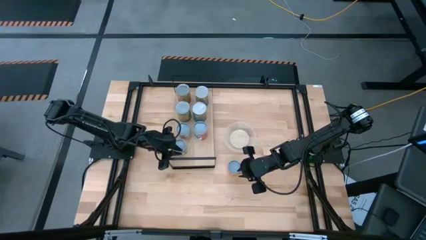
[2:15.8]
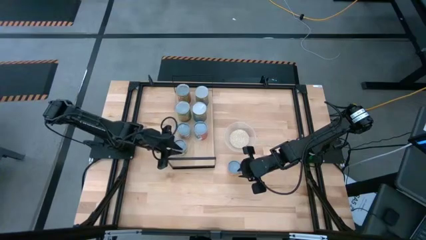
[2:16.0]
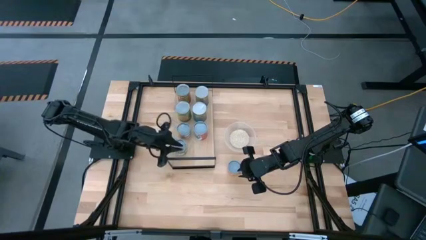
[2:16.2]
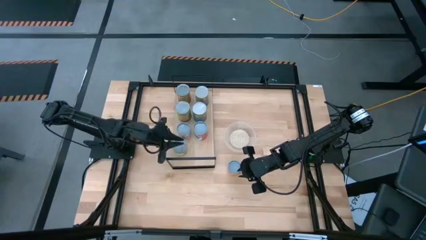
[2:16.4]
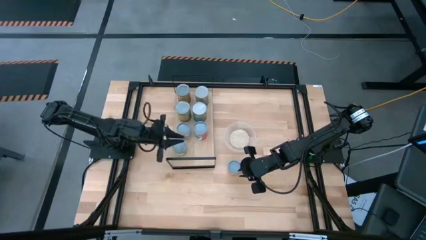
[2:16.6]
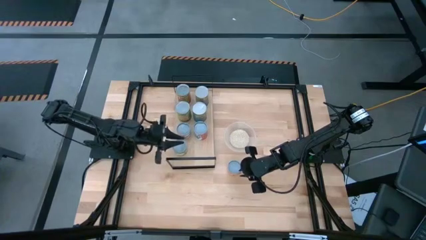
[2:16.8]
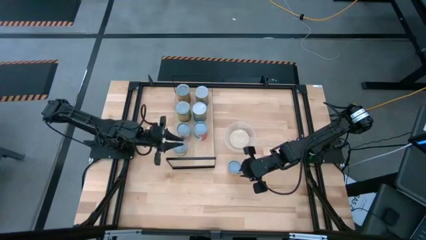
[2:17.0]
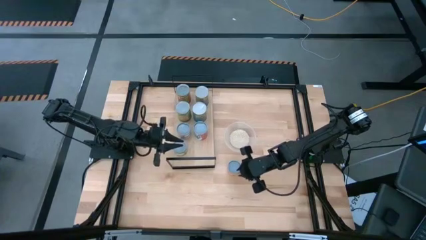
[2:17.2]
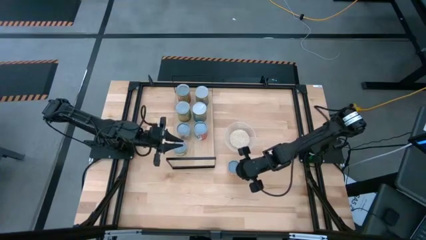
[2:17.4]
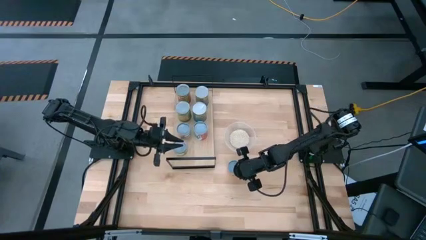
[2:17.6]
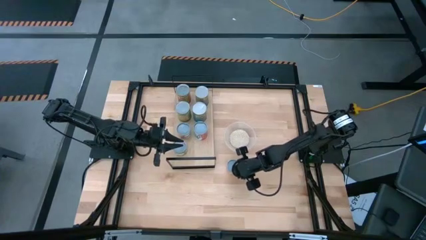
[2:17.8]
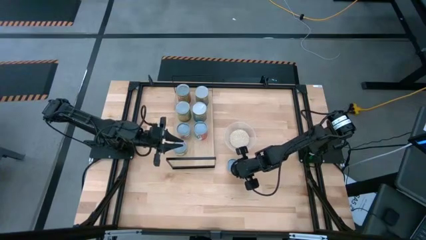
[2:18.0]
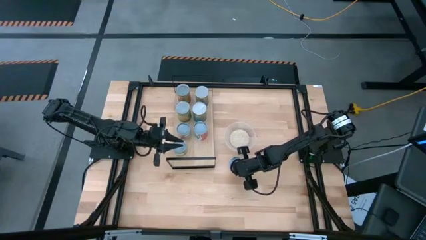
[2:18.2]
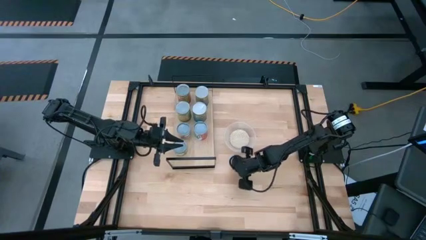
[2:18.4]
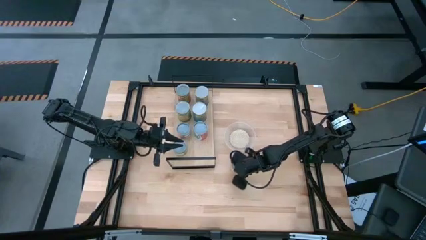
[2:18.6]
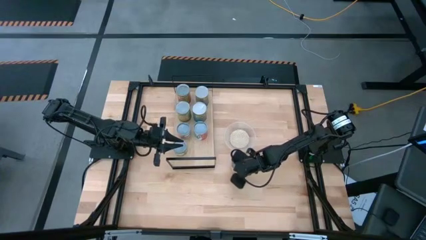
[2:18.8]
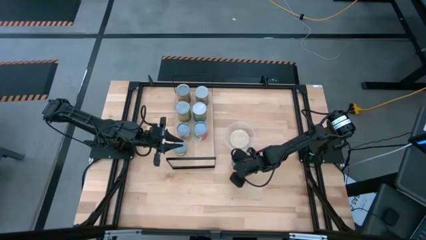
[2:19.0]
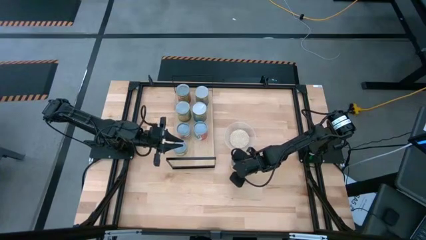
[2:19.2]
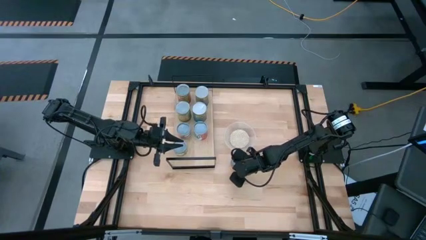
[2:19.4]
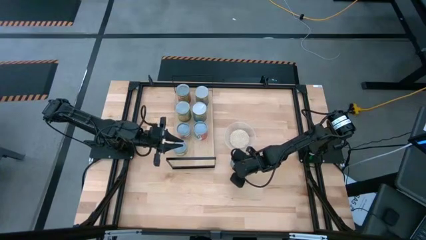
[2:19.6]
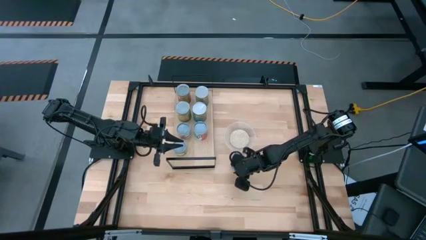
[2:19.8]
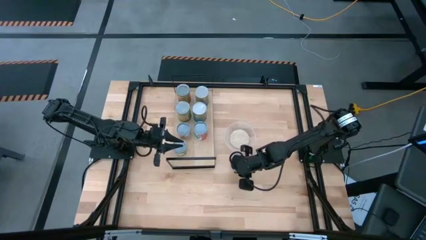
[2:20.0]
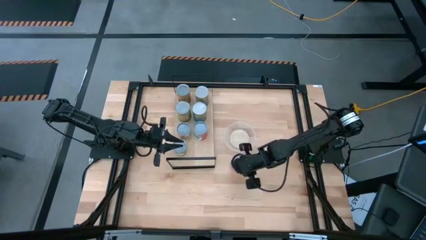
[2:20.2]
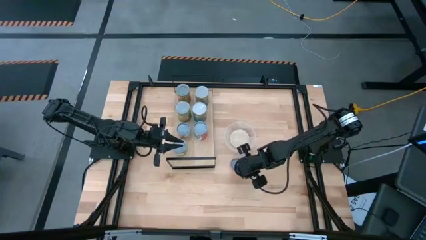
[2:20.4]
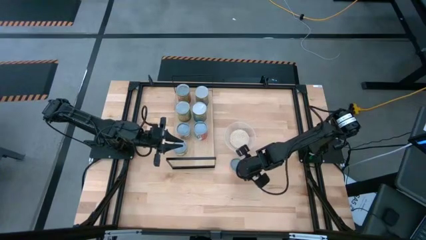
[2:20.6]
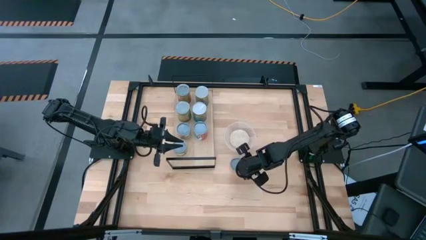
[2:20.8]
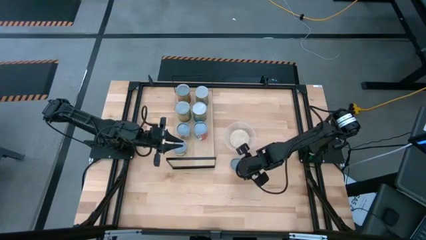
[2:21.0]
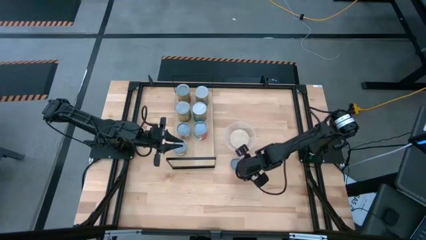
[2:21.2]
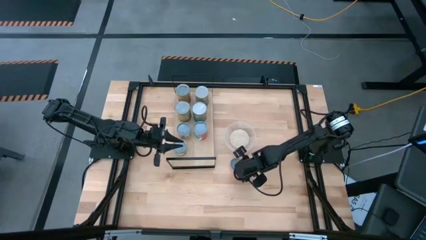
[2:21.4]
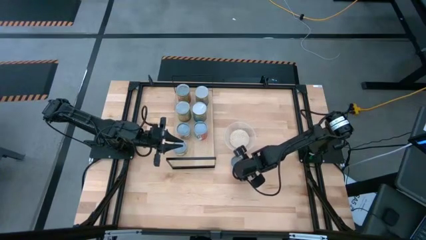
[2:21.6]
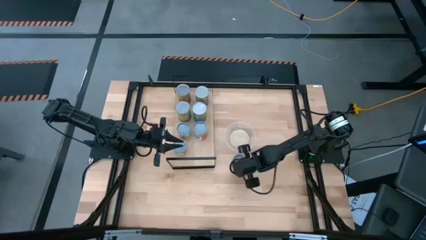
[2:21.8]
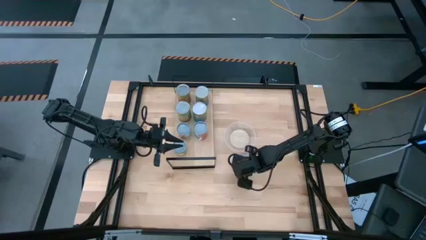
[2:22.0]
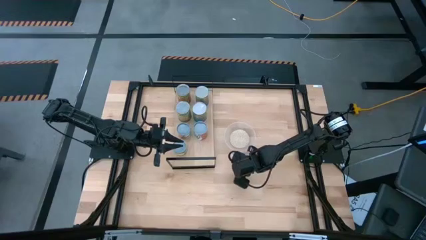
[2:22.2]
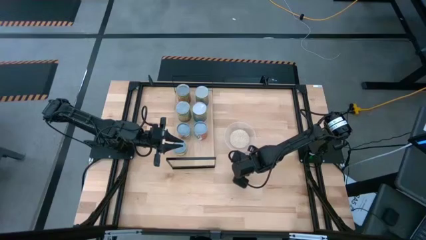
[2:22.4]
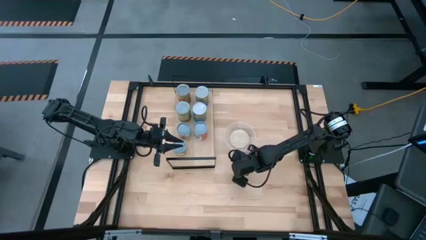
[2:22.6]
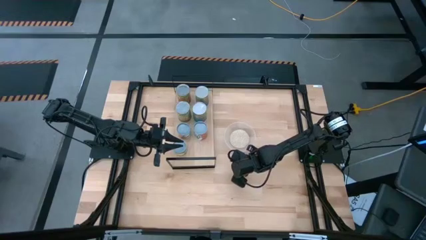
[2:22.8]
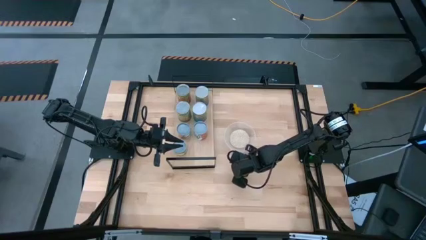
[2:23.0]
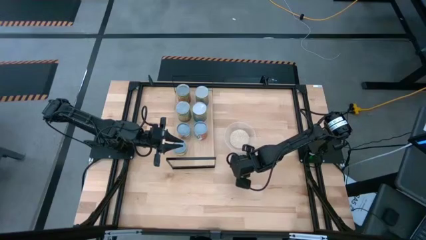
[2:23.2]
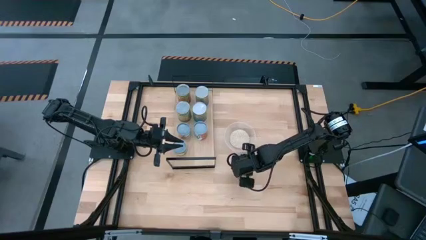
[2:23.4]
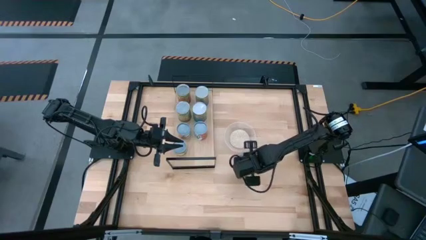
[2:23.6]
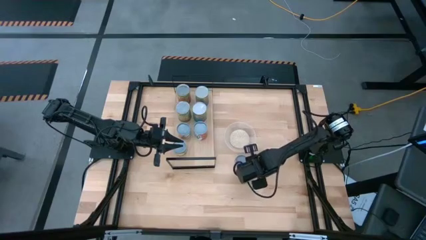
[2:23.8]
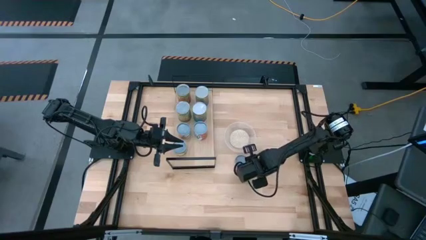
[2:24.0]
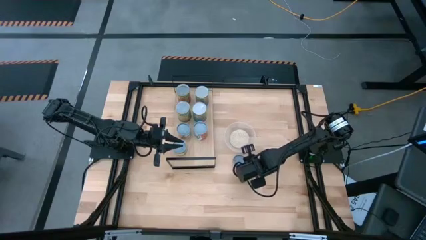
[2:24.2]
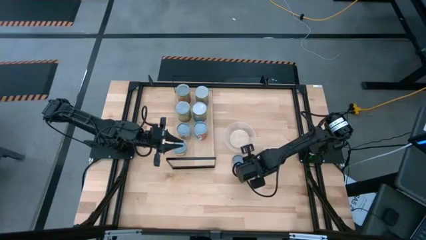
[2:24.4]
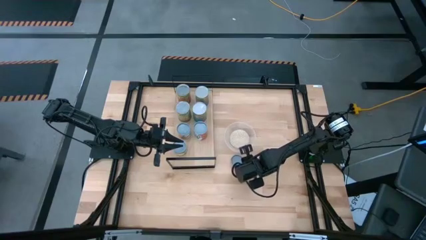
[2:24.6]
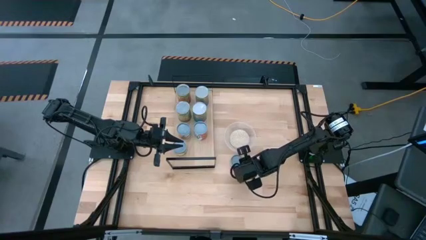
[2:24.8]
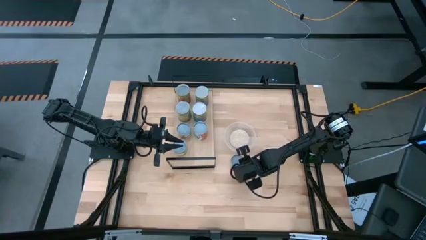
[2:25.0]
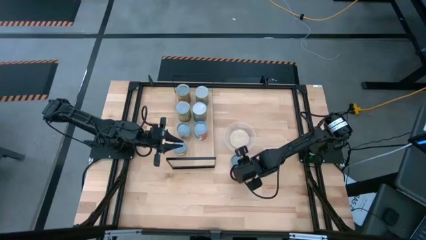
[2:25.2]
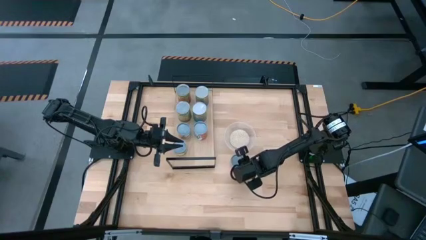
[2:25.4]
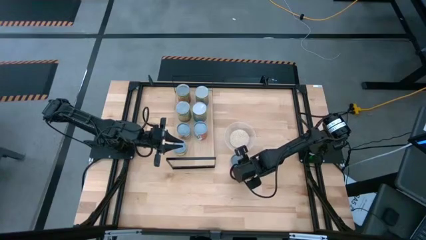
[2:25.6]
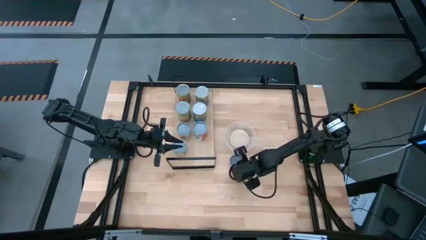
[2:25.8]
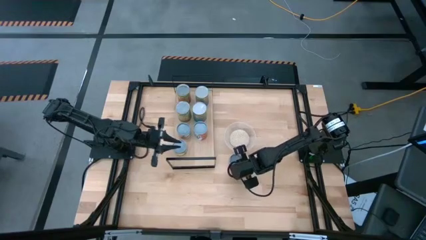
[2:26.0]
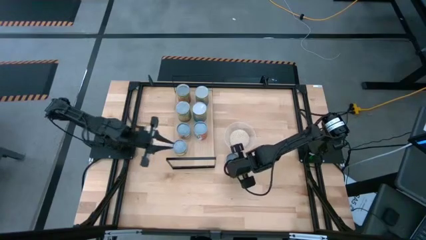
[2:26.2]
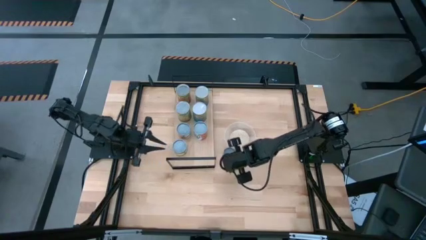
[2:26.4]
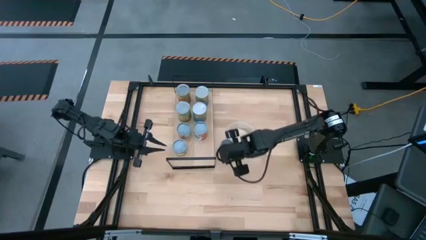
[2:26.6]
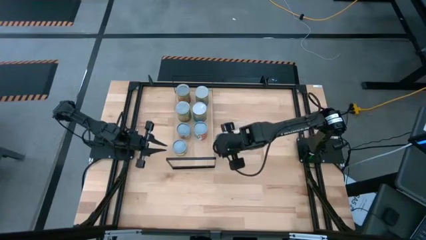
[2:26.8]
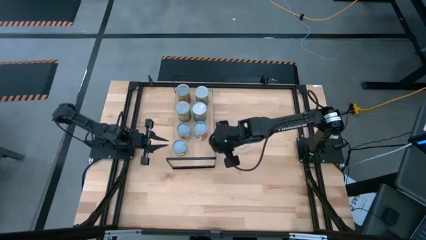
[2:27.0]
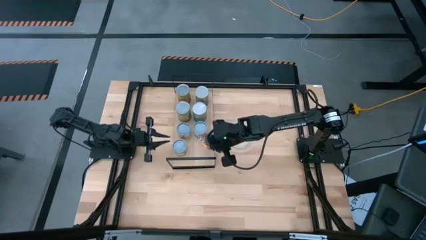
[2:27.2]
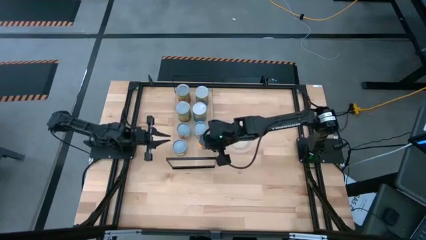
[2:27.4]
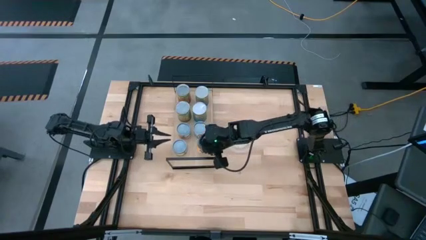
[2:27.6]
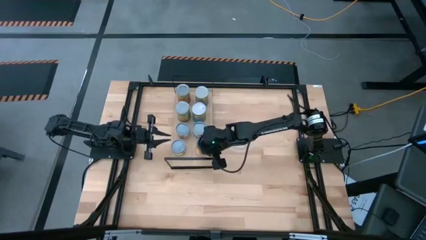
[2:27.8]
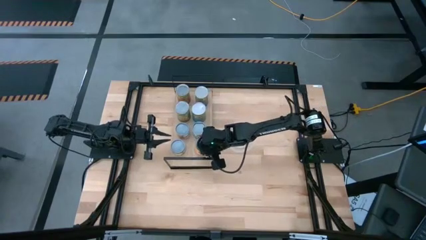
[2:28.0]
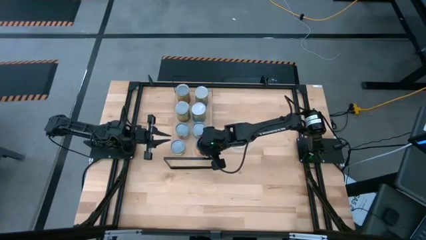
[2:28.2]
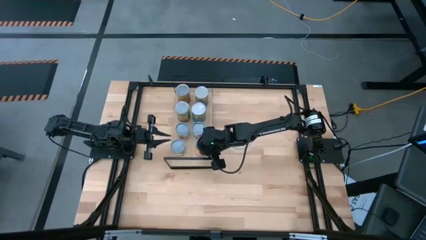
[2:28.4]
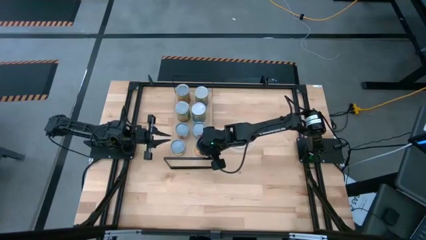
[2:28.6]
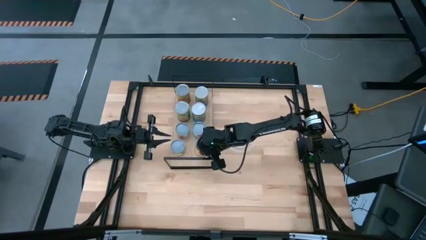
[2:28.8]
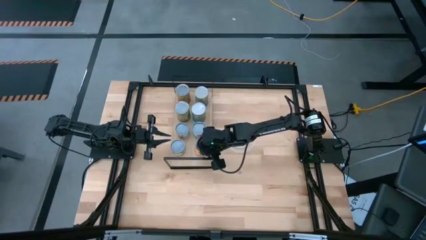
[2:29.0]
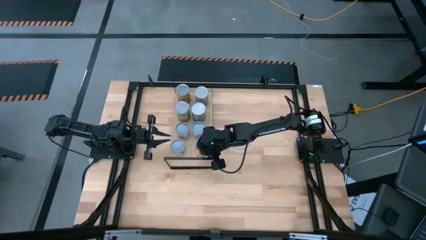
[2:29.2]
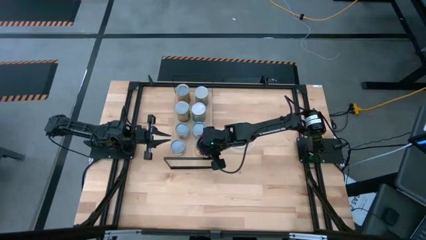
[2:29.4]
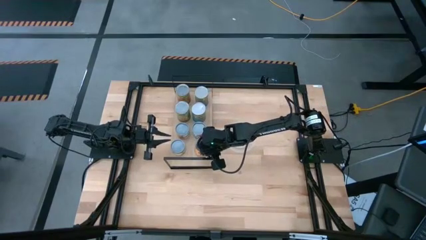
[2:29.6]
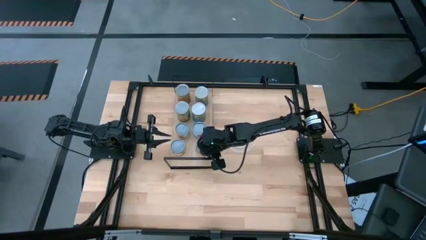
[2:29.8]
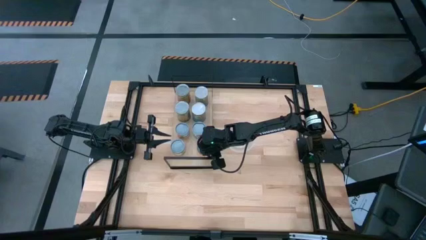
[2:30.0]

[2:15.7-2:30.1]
Task: Pick and place cans onto a shelf
Put the small canned pineapple on the shelf
